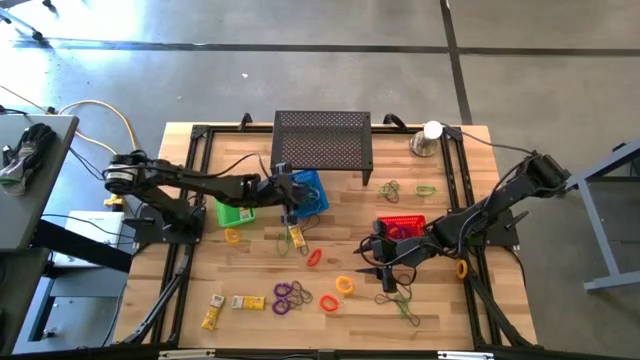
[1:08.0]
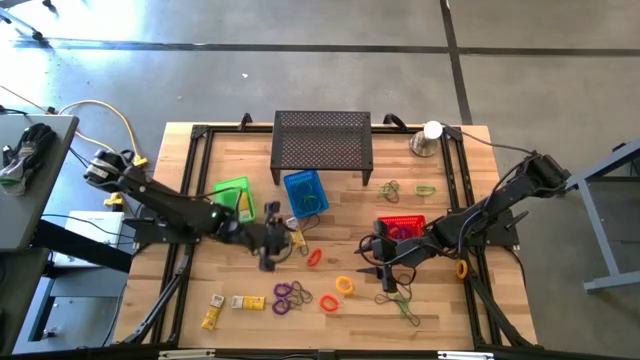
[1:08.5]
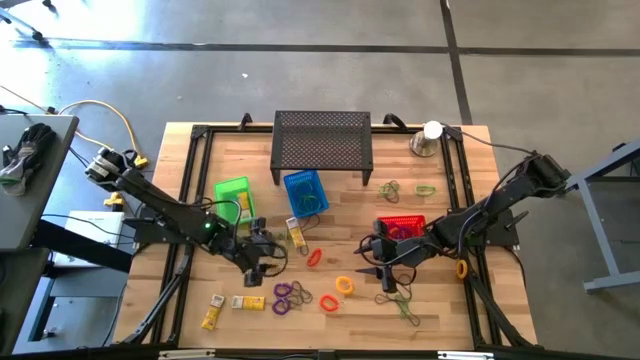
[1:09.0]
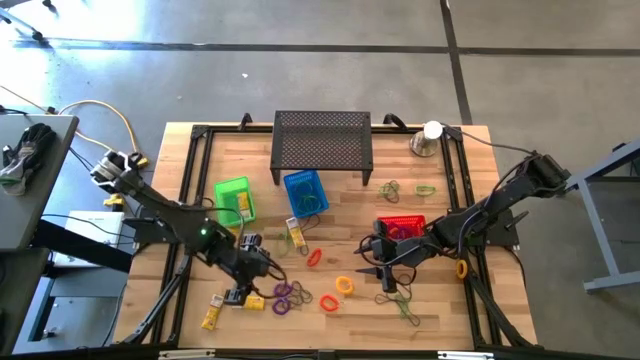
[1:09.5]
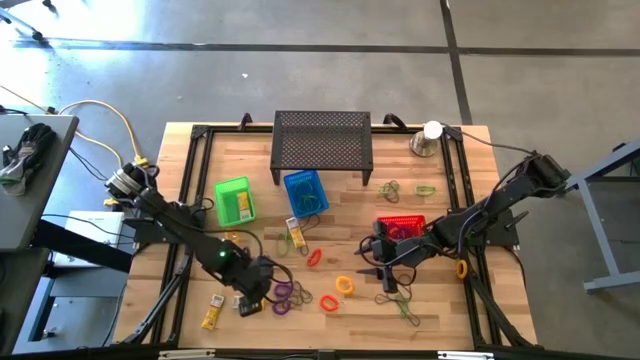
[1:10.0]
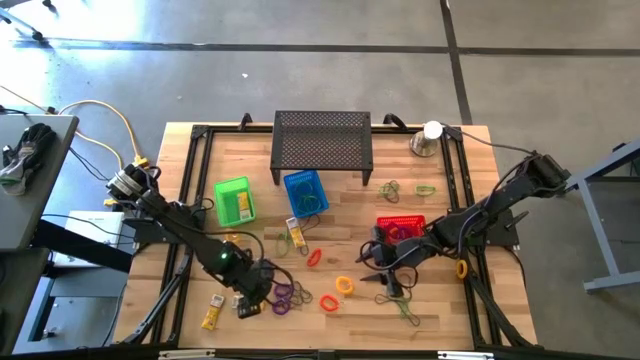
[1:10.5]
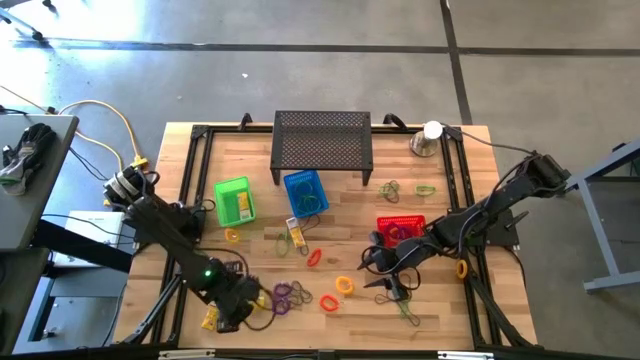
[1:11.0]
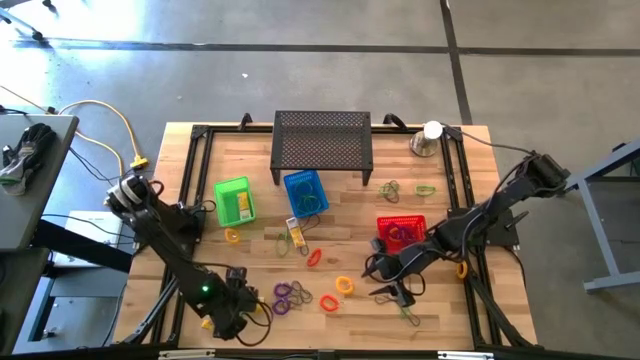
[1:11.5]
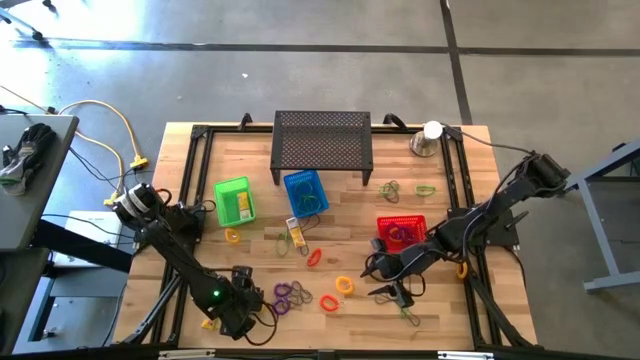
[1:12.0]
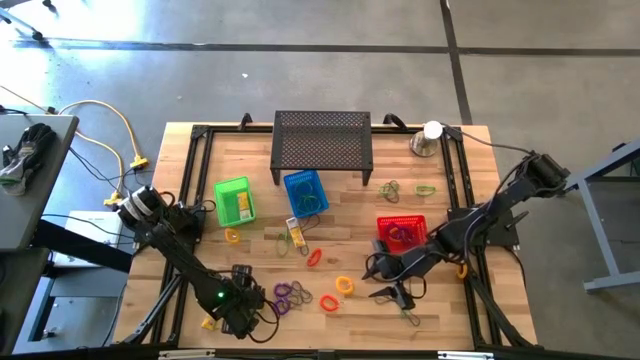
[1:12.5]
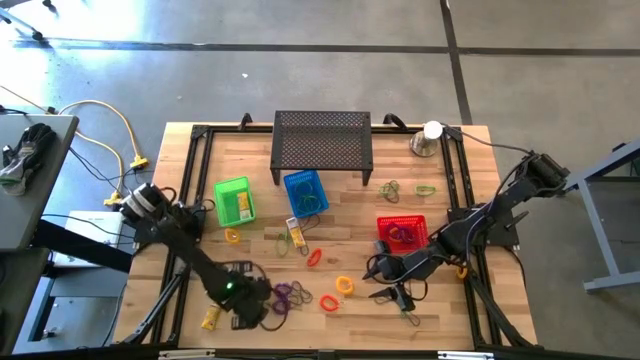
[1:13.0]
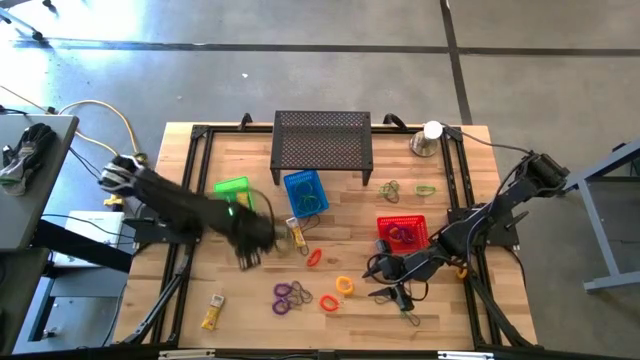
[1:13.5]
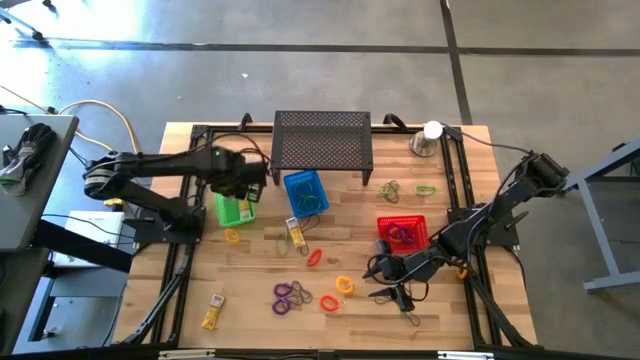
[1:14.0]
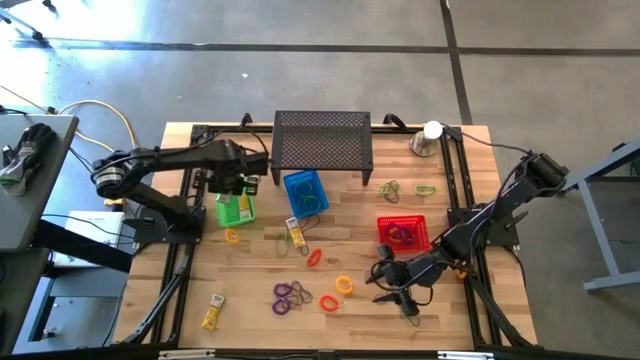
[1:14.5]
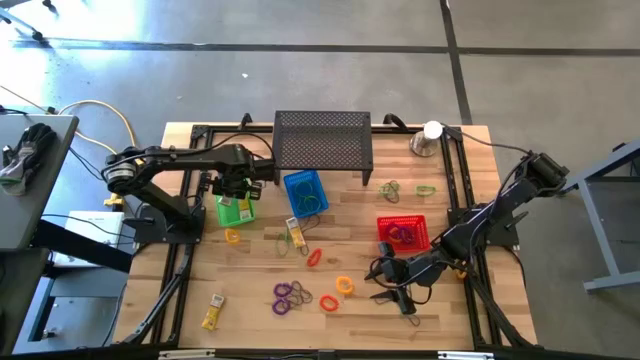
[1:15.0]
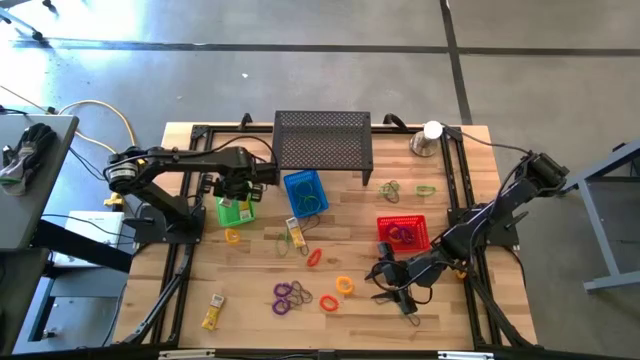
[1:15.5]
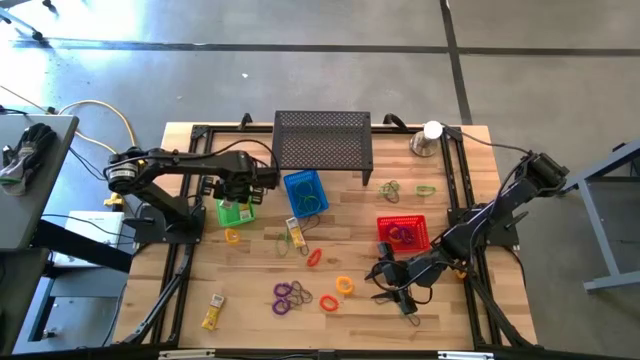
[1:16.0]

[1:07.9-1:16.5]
Task: Pick & Place Office Desk Supplies
Put the yellow crayon box into the green basket

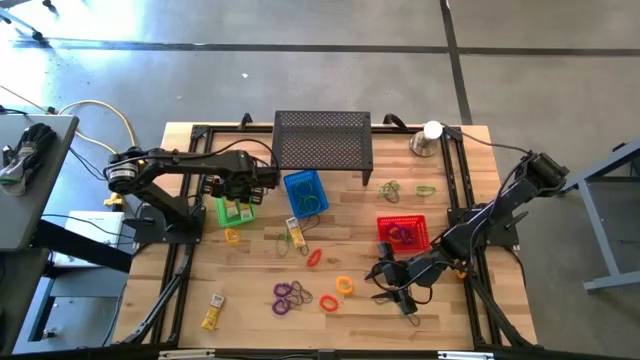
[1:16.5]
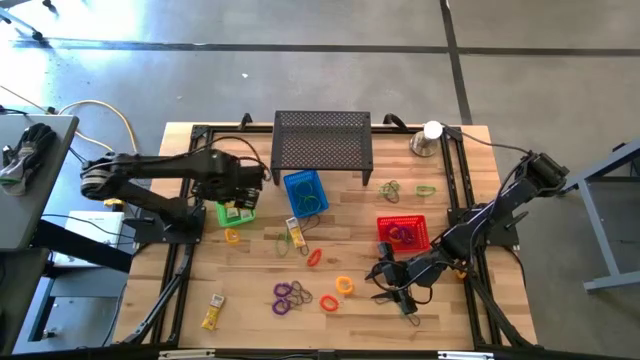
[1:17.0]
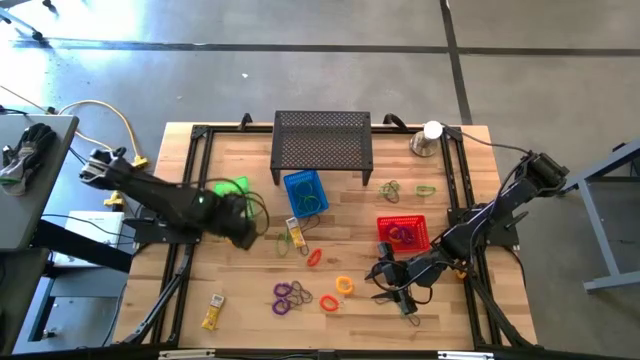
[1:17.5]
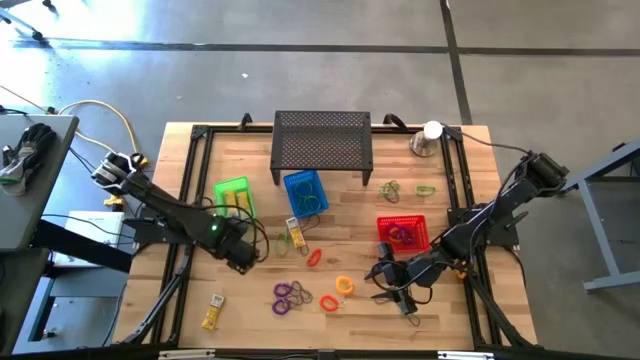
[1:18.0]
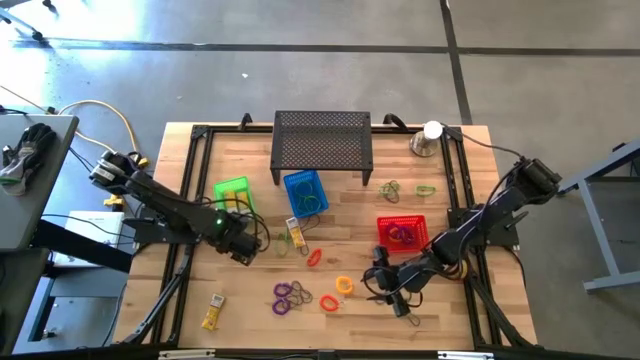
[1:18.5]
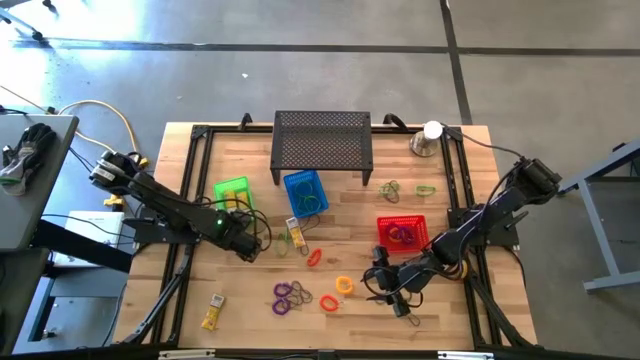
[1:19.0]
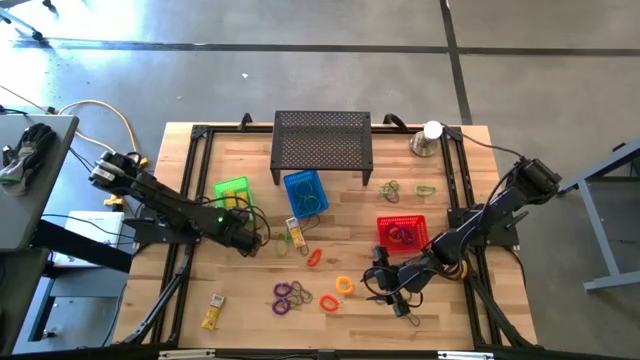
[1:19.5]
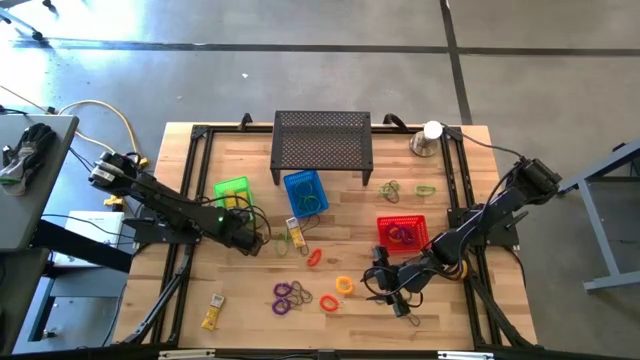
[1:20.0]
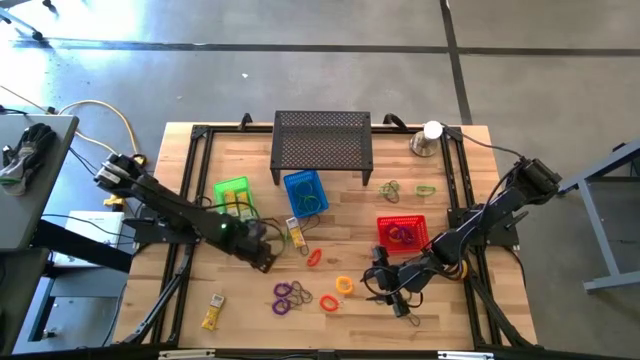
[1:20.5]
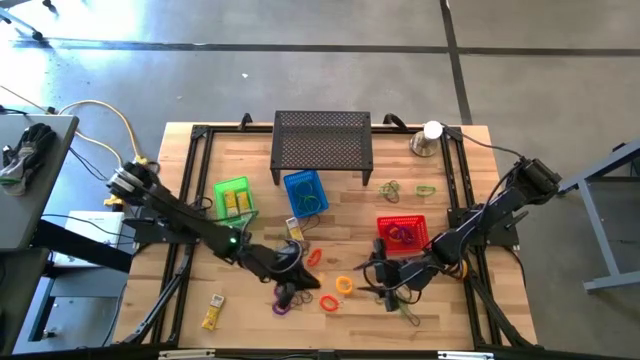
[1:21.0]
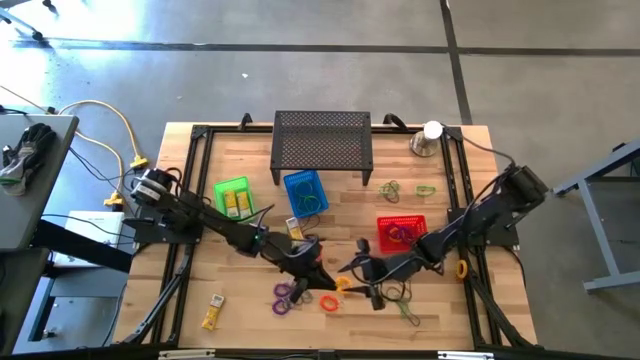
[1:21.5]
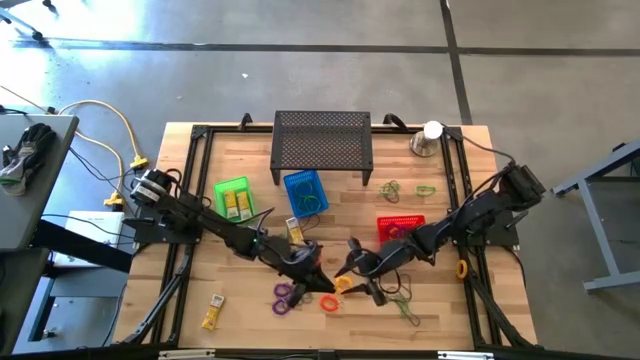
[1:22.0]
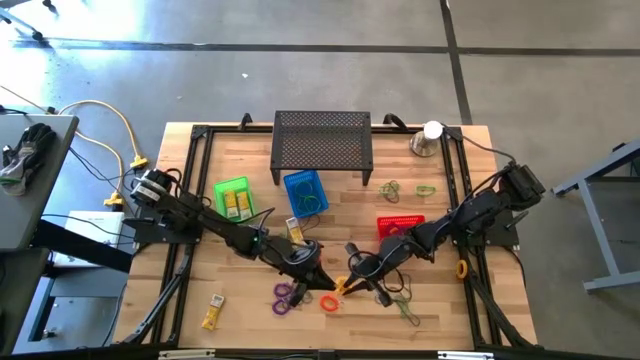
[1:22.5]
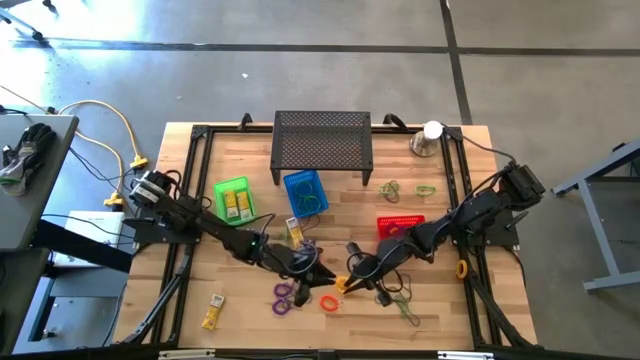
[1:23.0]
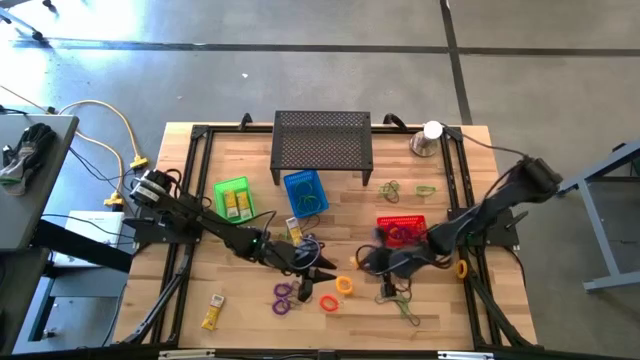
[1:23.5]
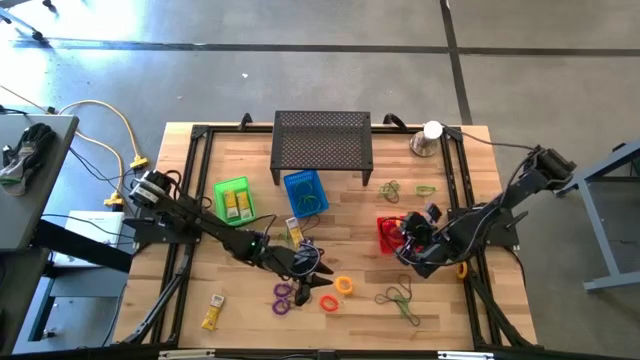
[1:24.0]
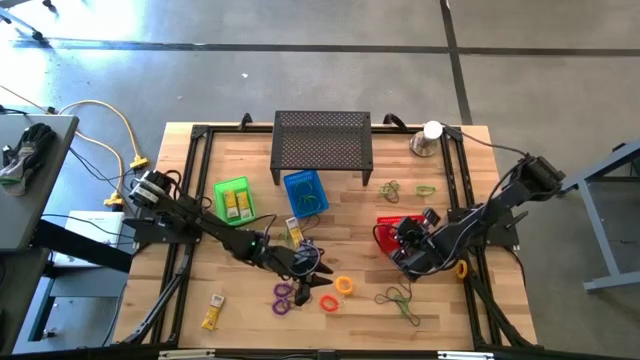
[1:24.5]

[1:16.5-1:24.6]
Put the orange spring keychain into the red basket

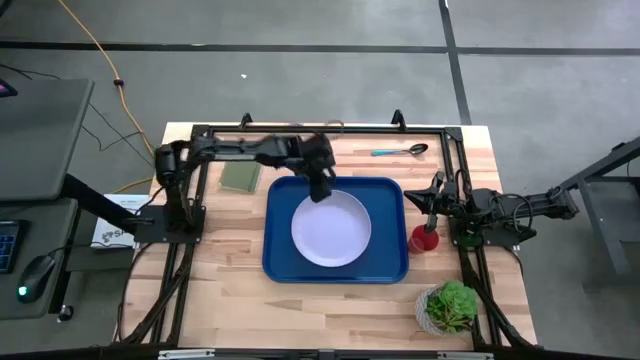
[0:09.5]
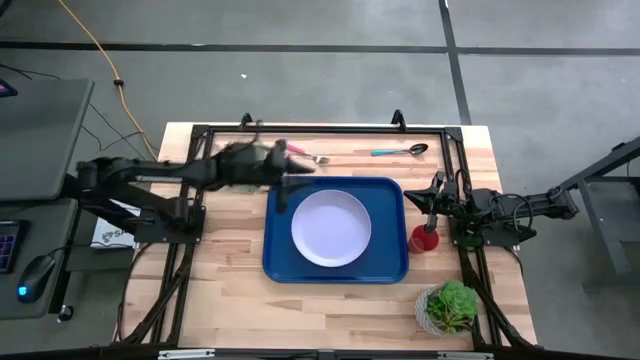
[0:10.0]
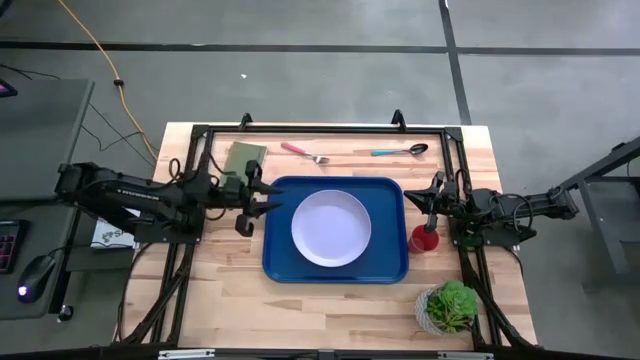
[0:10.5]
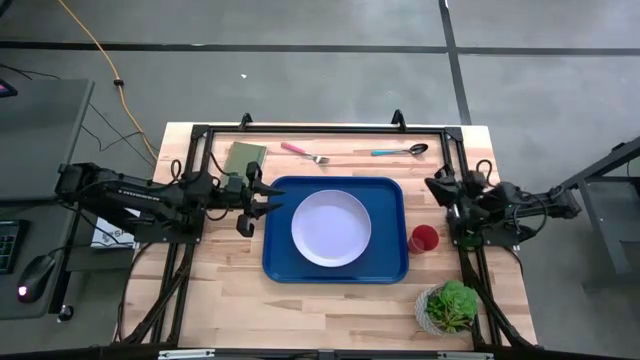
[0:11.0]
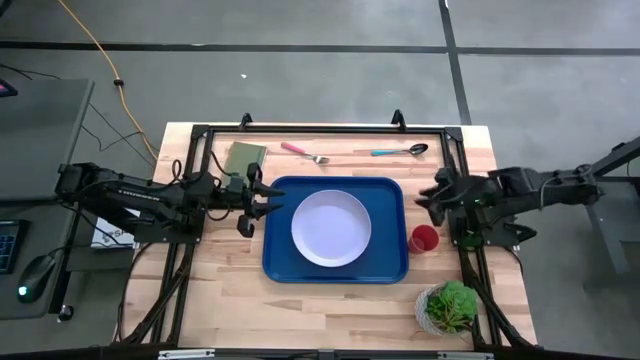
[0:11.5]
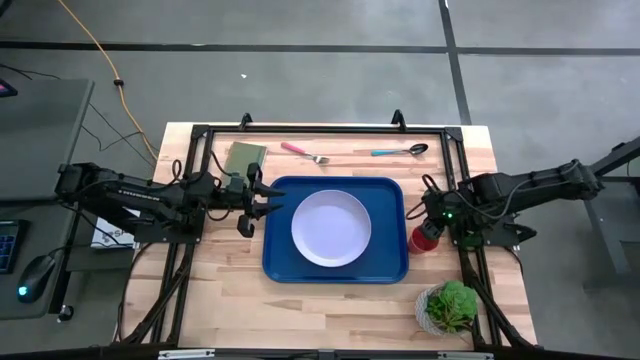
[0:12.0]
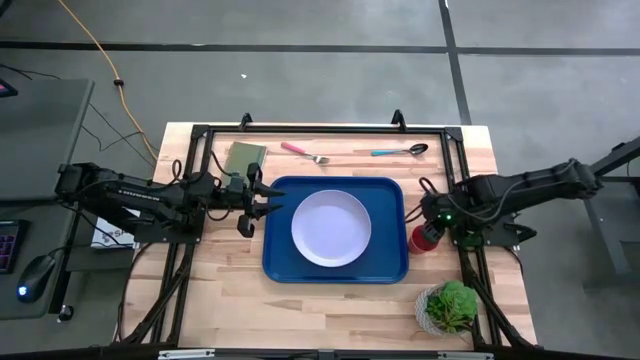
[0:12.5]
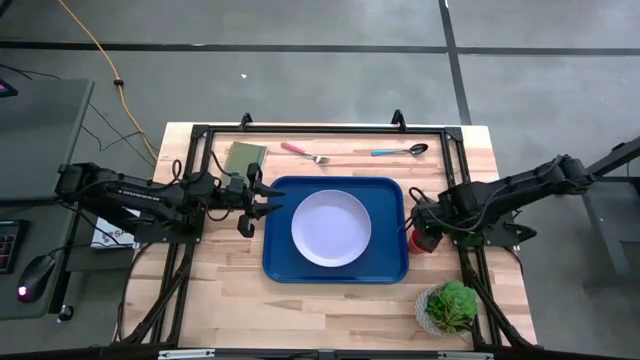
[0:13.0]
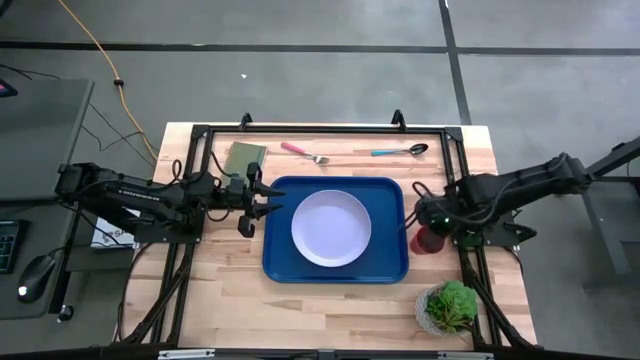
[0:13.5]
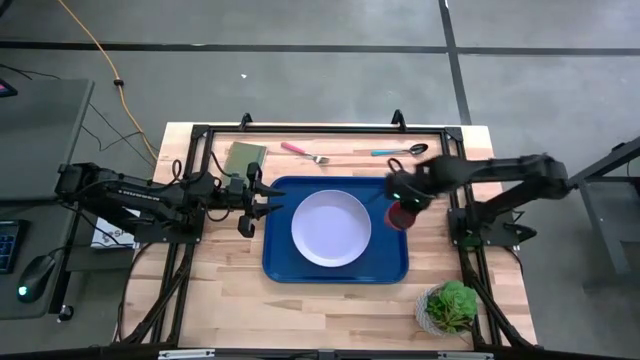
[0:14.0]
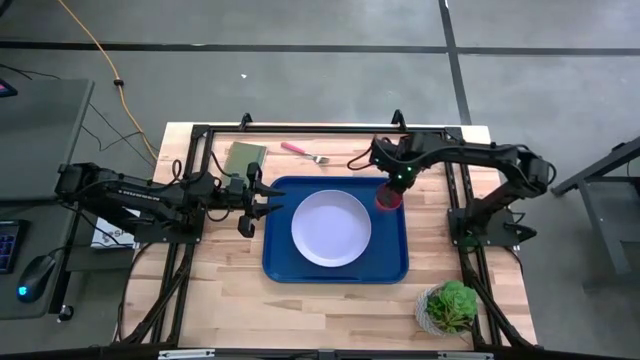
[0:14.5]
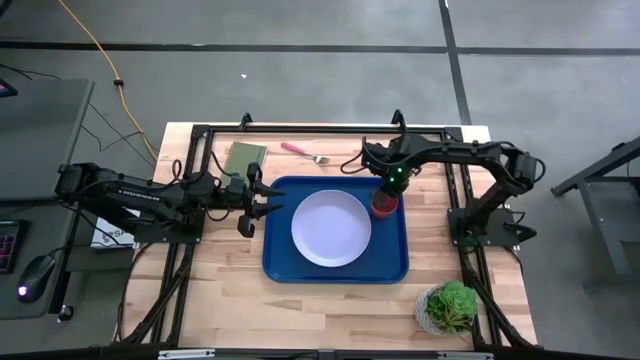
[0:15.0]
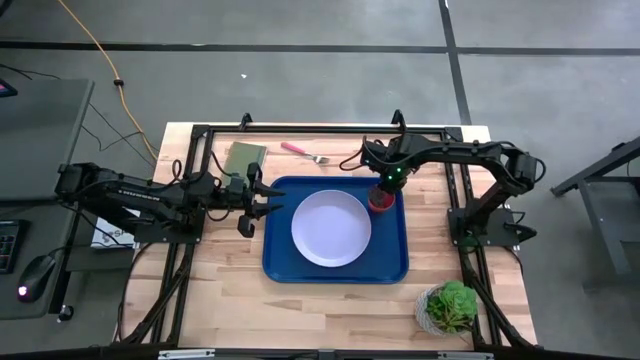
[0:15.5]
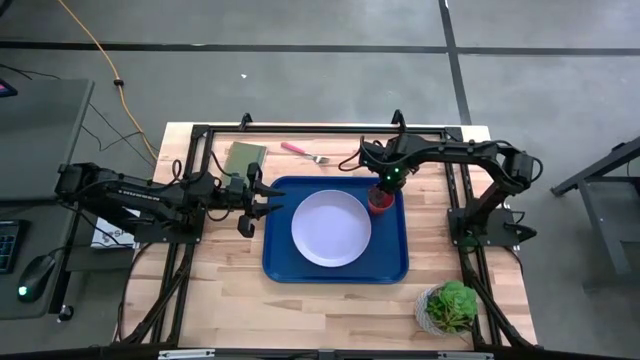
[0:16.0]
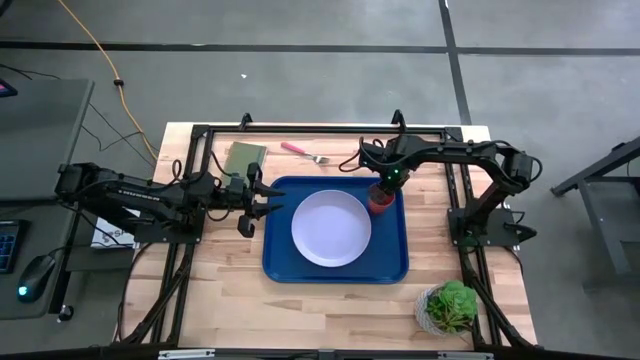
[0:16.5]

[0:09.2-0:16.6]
Task: Pick and place plate/cup/fork/spoon on tray
Put the red cup on the blue serving tray to the top right of the purple plate
